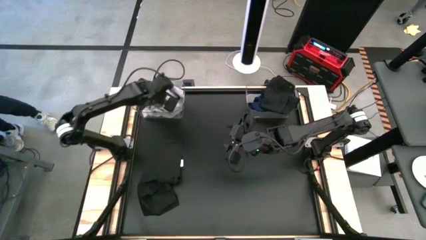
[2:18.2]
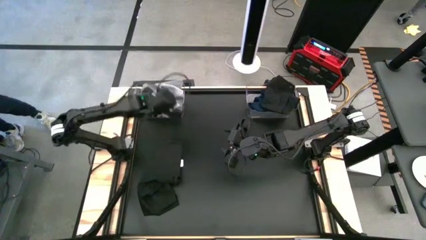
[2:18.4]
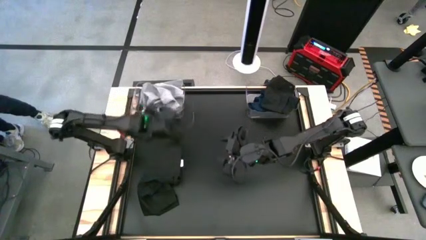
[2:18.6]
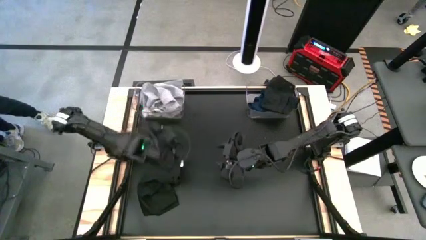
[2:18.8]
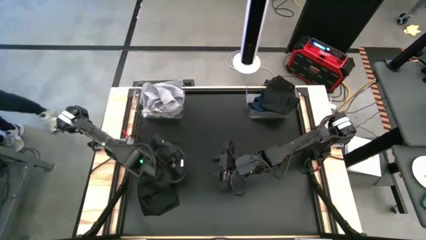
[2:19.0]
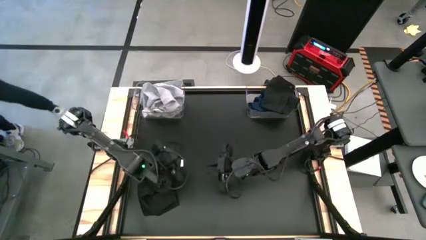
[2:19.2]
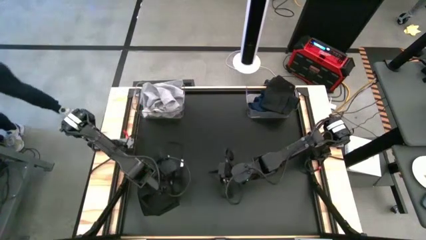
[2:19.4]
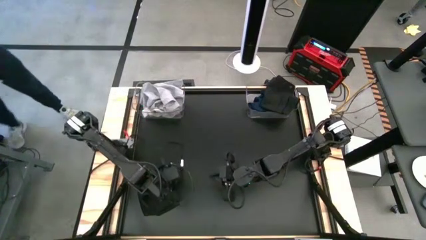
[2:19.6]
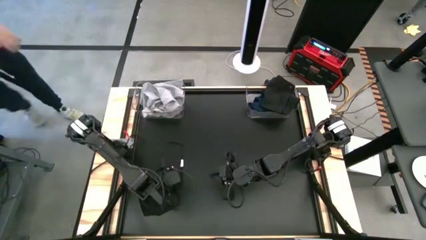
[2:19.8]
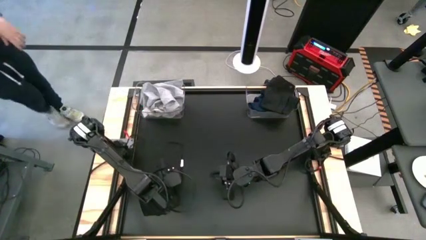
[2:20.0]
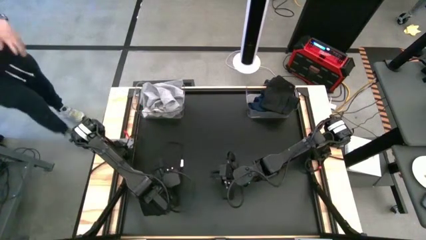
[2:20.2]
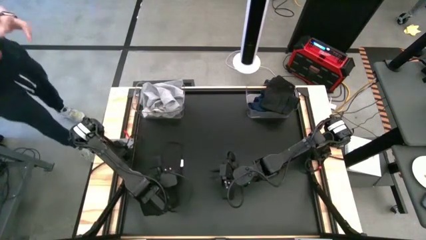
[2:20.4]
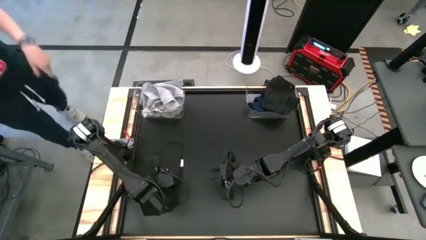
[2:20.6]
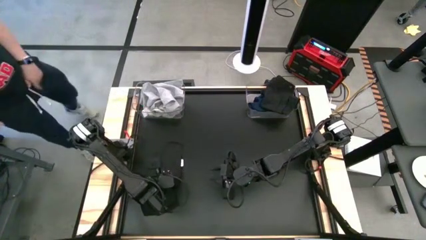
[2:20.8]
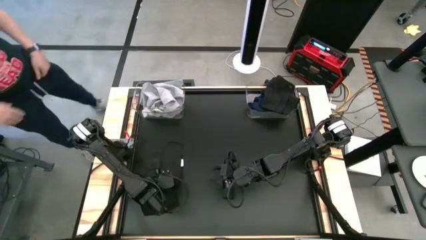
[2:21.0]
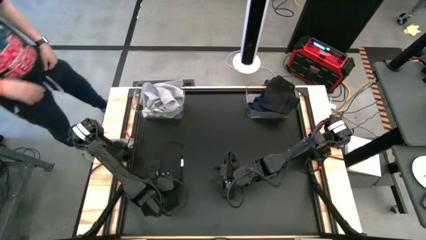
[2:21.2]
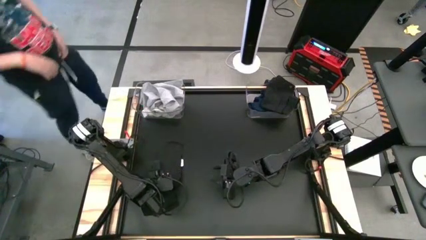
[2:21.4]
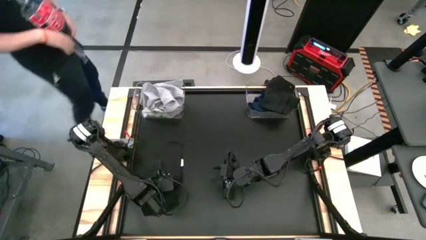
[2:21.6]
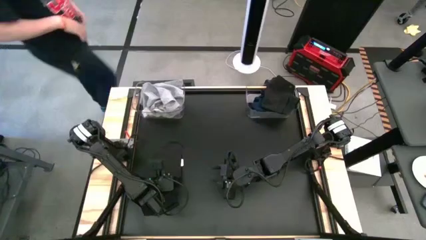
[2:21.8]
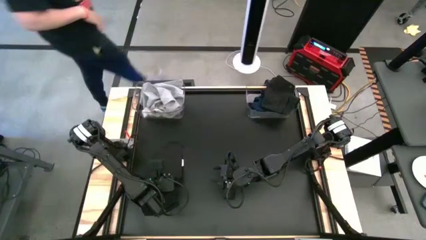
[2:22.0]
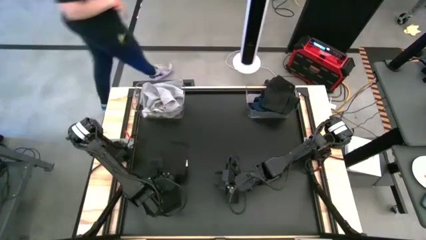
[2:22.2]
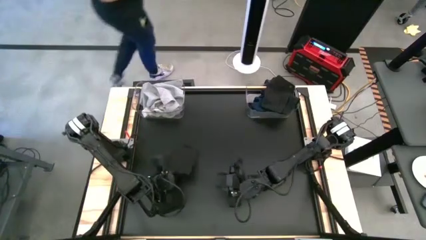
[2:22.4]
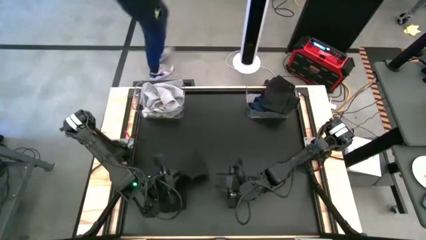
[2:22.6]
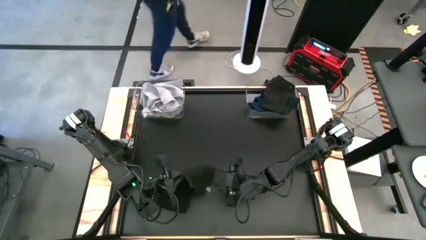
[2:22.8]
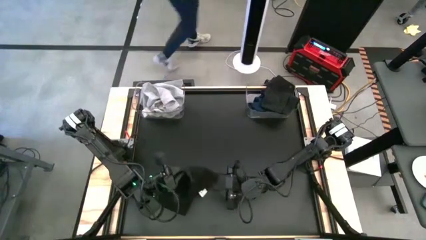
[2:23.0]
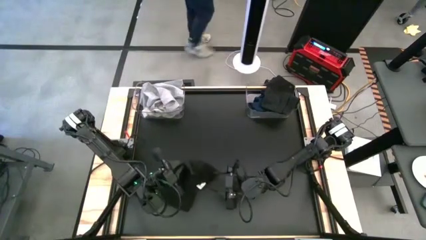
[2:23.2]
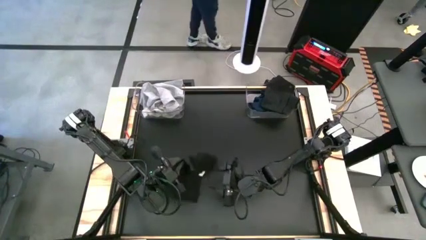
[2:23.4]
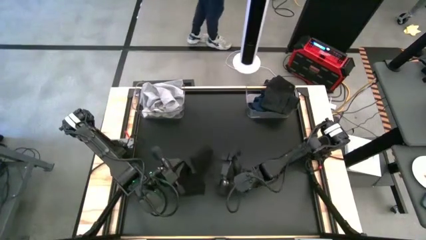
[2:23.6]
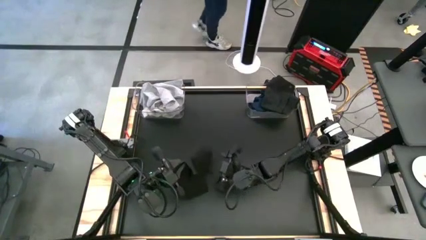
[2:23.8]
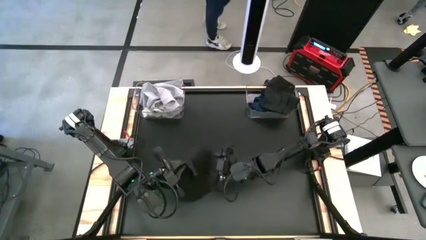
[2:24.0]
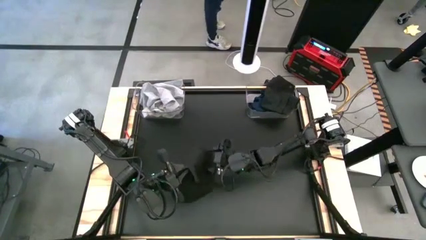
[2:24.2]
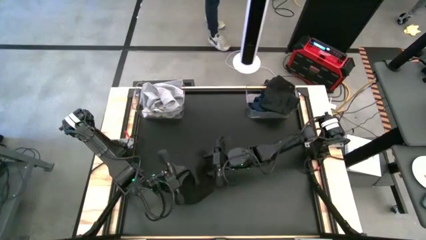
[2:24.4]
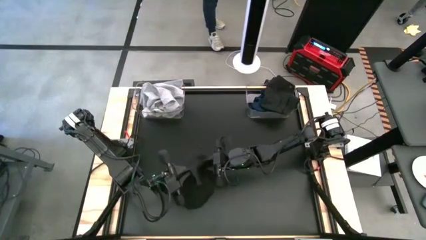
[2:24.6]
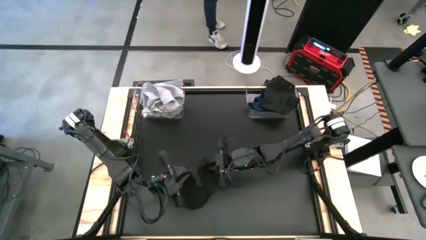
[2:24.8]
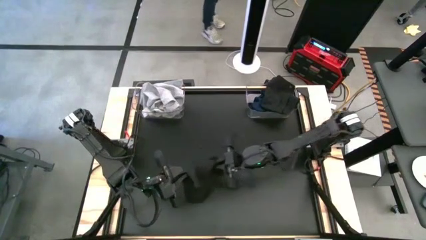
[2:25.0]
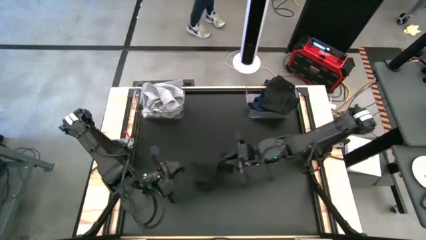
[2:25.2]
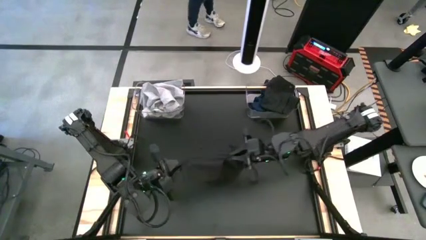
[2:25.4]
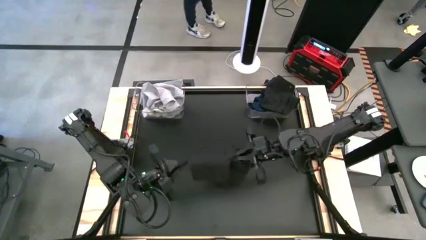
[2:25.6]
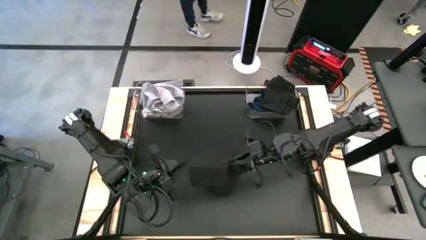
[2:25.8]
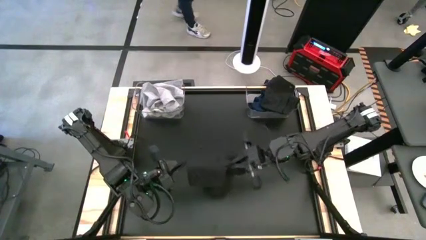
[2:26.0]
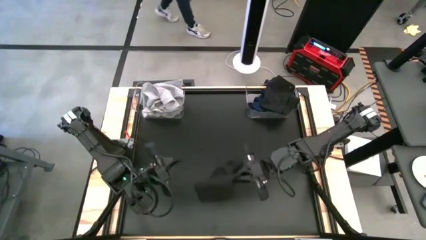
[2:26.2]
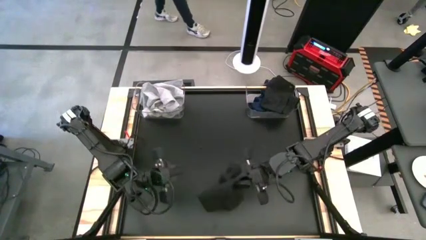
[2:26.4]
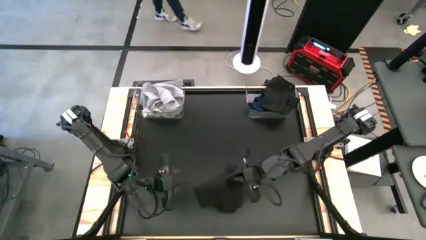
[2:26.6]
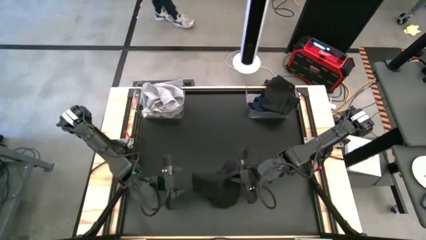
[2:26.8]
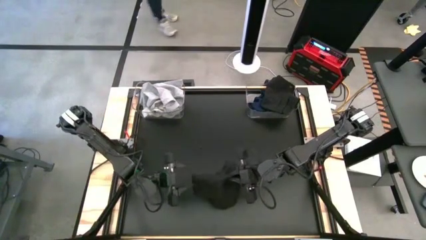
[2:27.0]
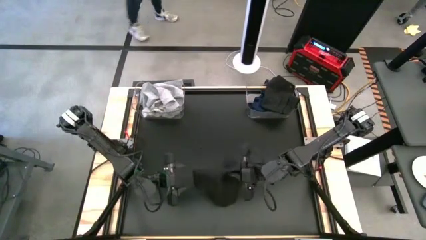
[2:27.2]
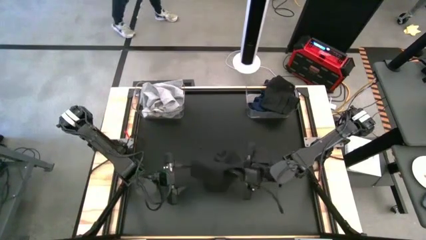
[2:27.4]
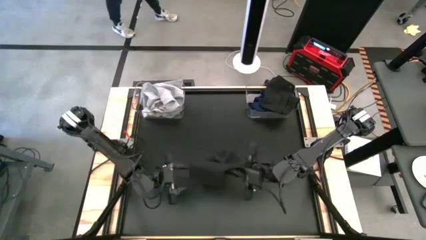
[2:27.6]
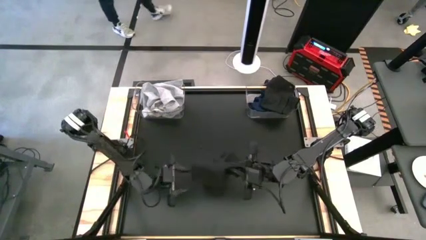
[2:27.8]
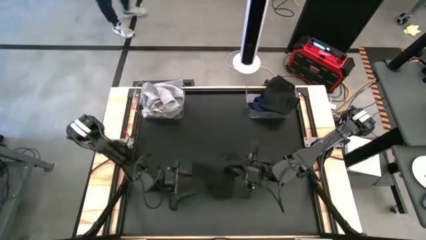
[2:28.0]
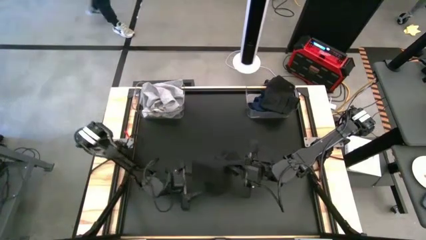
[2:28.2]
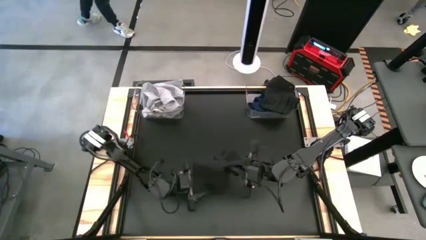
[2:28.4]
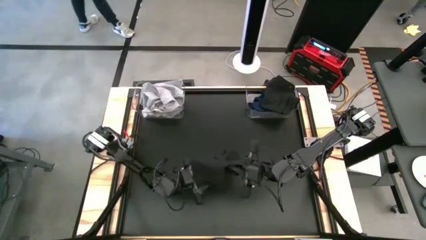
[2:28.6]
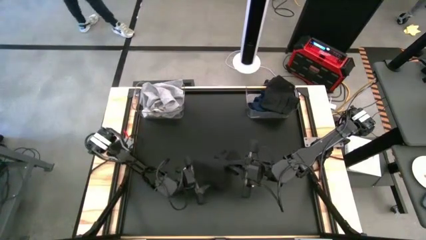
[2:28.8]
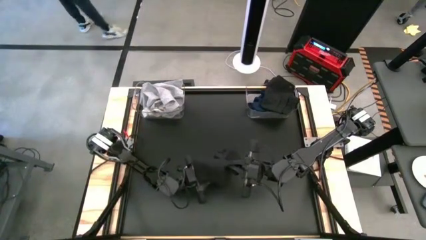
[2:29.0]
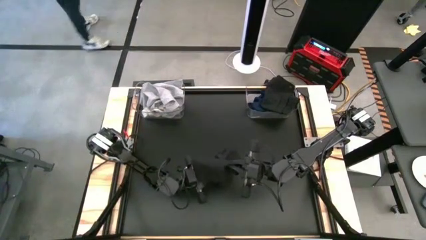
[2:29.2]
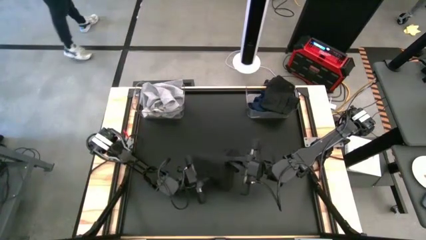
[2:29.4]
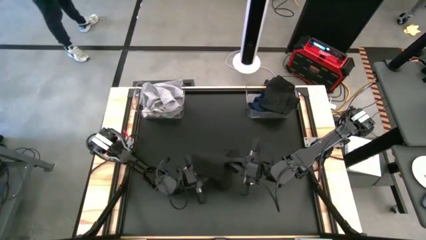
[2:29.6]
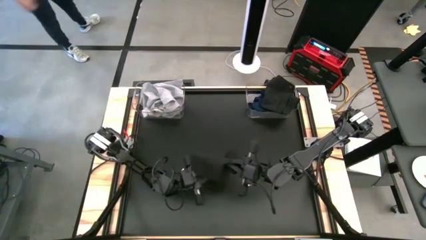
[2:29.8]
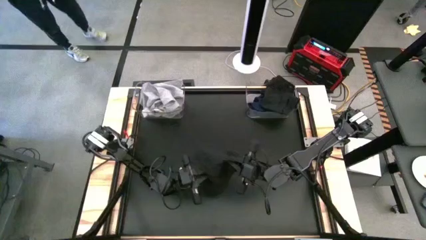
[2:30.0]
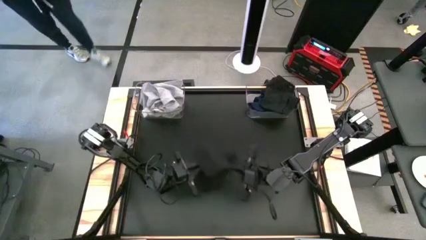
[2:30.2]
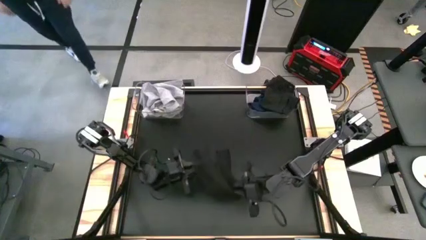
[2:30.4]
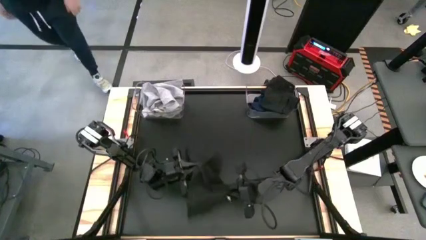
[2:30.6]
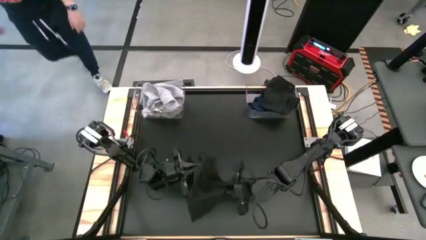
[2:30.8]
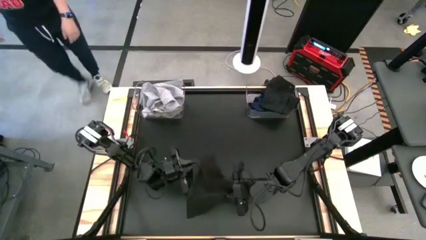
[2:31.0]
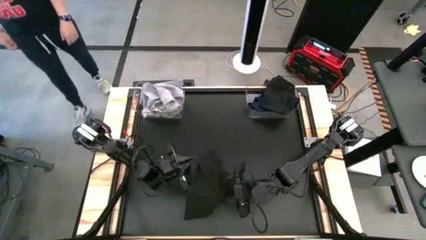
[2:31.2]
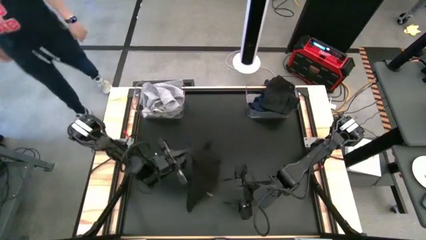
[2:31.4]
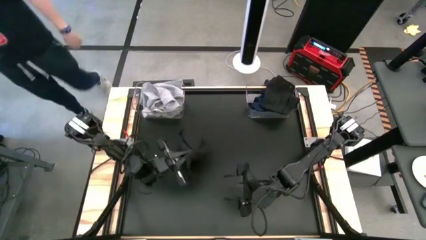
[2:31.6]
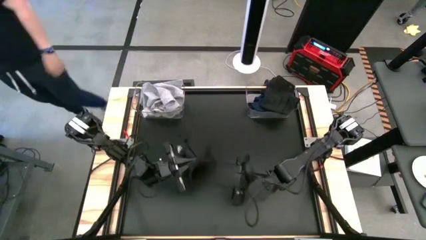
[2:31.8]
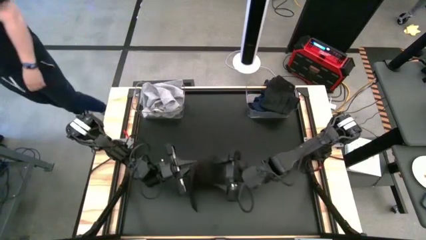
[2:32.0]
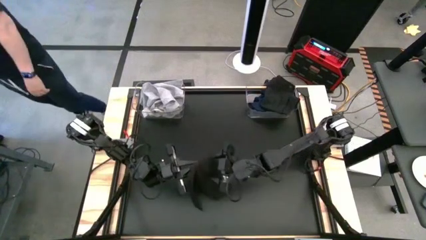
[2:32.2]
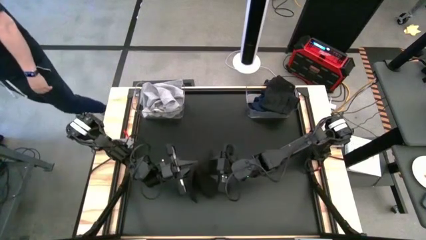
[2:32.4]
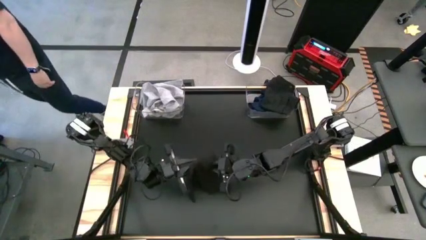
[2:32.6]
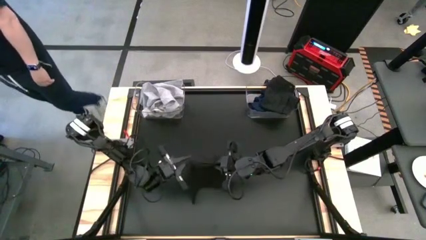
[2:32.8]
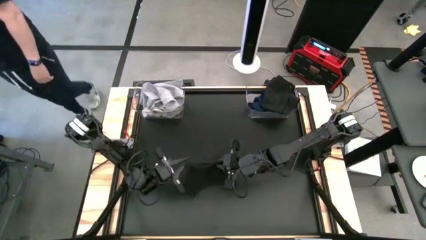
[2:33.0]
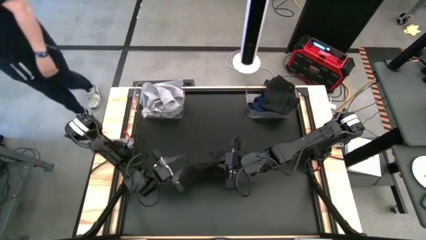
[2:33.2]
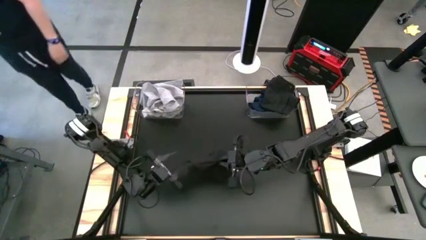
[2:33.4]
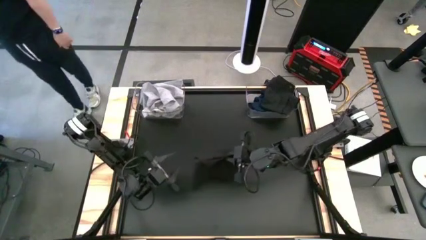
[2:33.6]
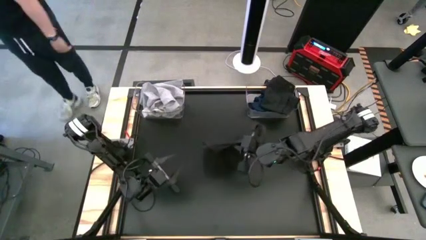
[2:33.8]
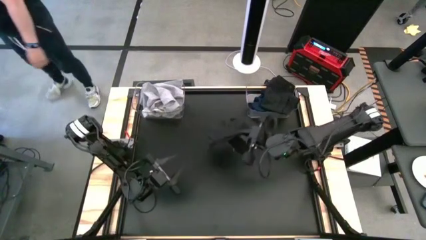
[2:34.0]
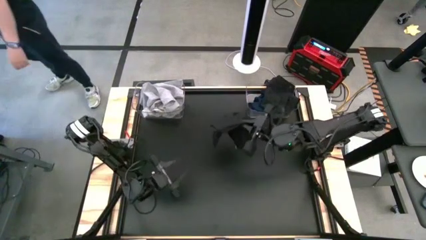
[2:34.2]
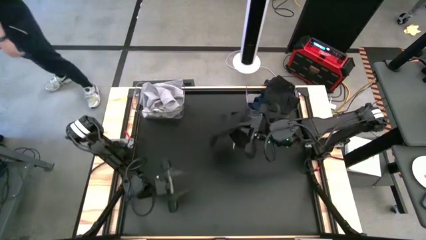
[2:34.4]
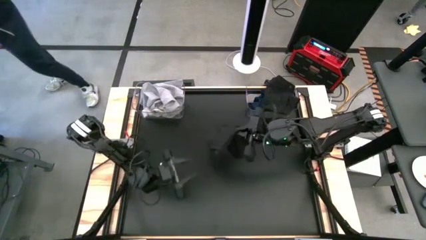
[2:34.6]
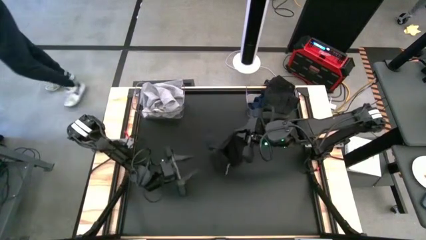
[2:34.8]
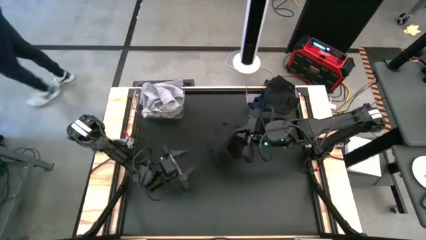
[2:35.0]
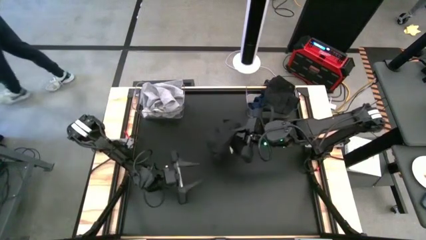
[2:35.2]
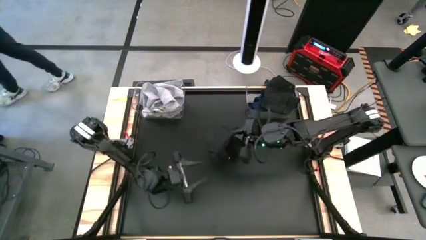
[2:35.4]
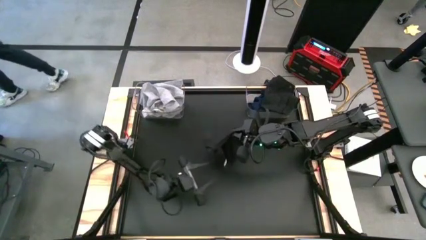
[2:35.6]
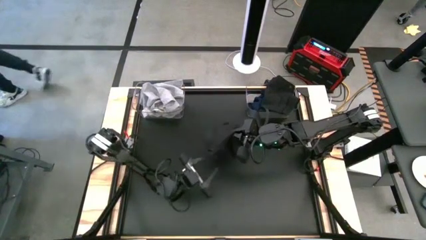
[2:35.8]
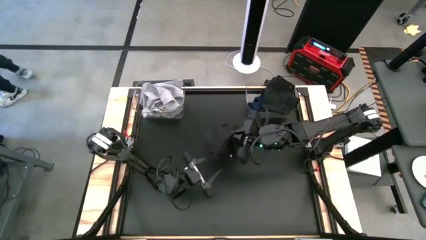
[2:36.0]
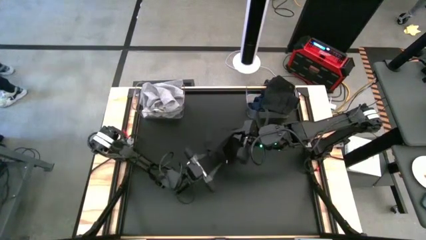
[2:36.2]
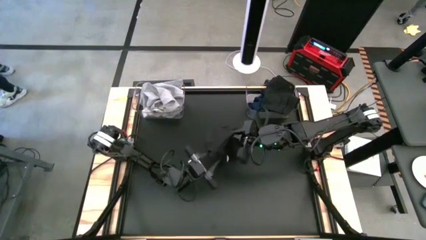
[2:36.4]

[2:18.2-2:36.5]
Task: Sort towels by color in basket
Put the black towel into the right transparent bin
